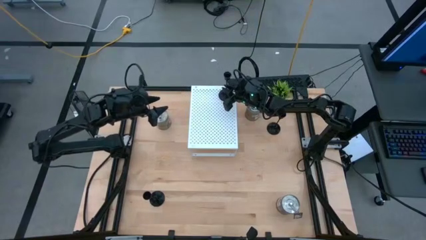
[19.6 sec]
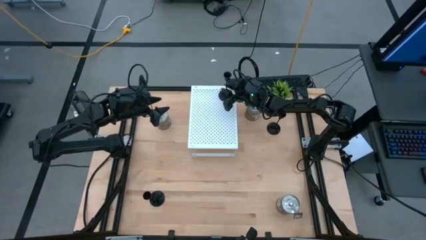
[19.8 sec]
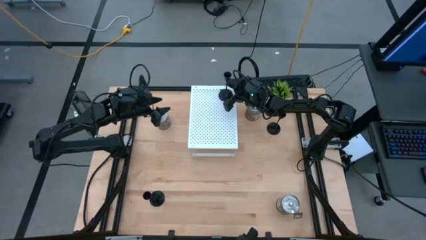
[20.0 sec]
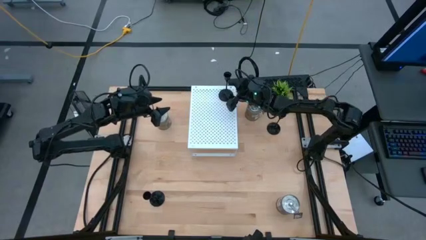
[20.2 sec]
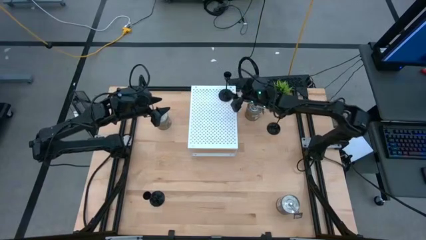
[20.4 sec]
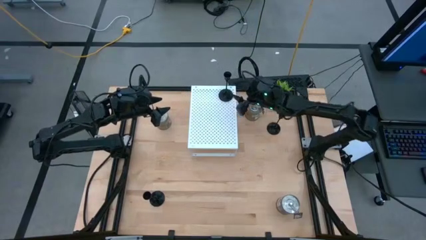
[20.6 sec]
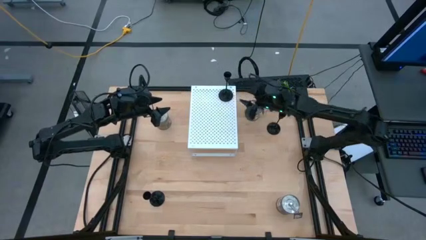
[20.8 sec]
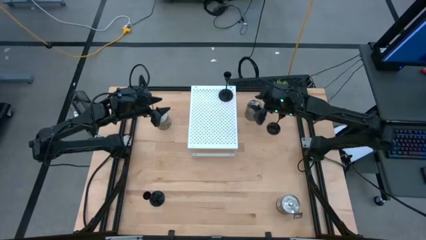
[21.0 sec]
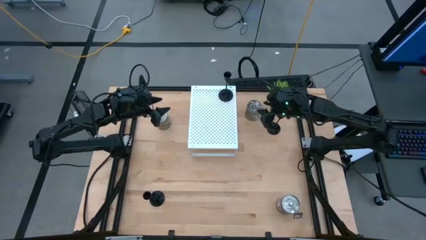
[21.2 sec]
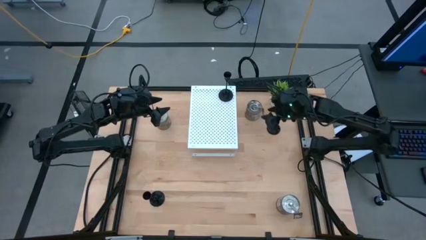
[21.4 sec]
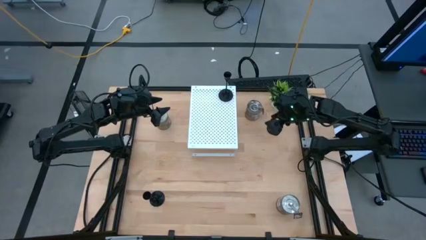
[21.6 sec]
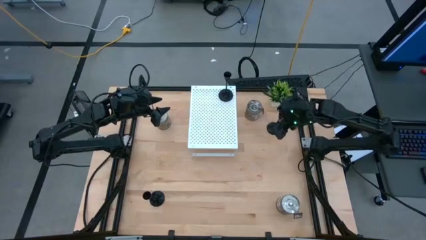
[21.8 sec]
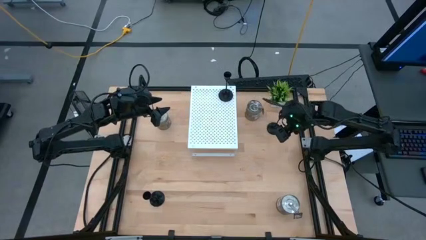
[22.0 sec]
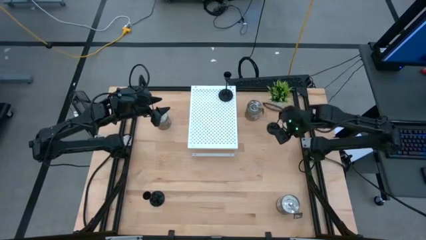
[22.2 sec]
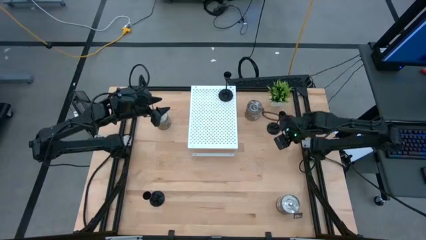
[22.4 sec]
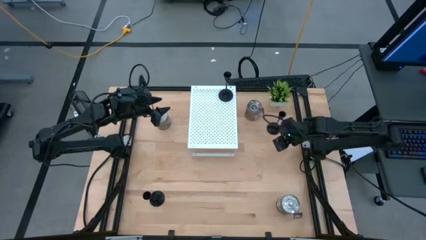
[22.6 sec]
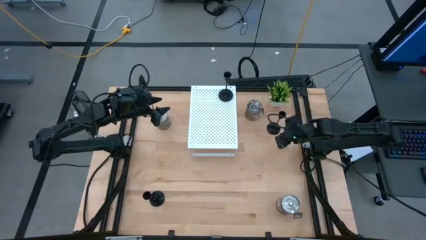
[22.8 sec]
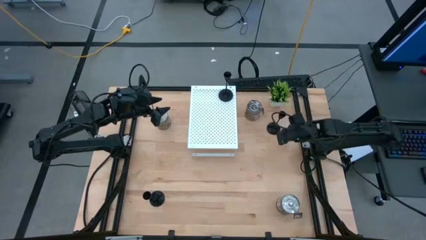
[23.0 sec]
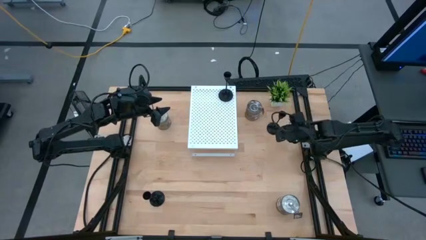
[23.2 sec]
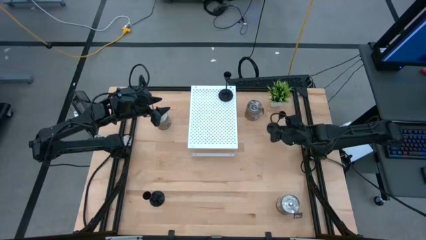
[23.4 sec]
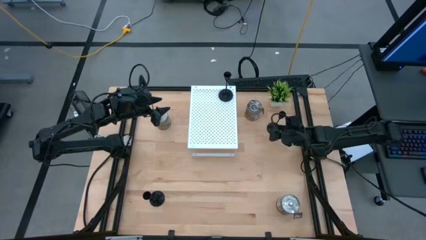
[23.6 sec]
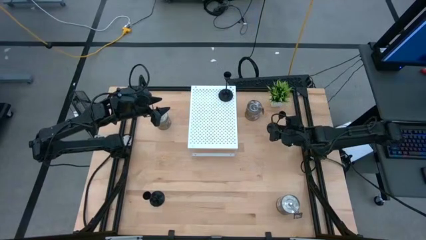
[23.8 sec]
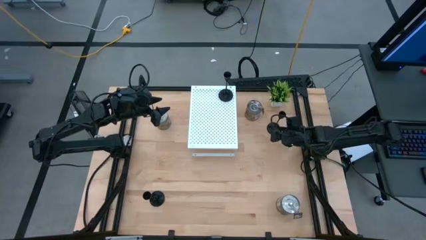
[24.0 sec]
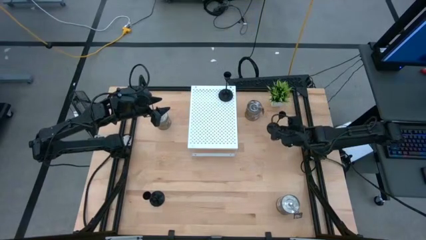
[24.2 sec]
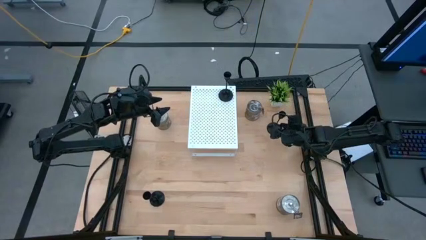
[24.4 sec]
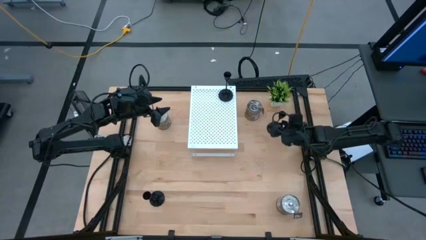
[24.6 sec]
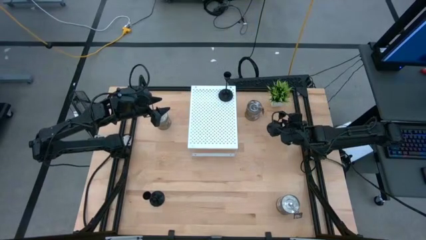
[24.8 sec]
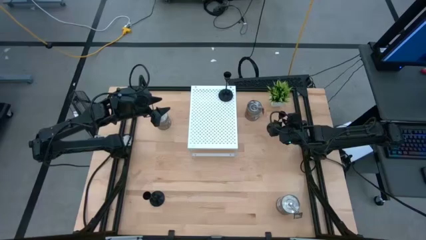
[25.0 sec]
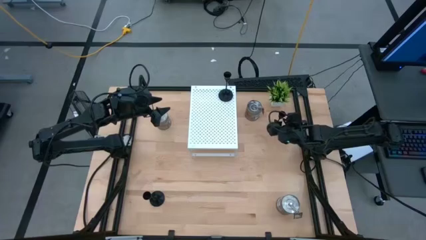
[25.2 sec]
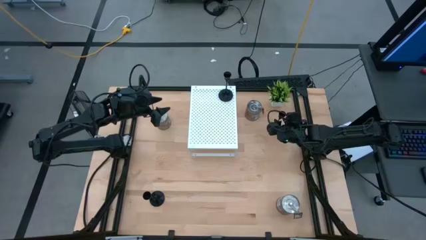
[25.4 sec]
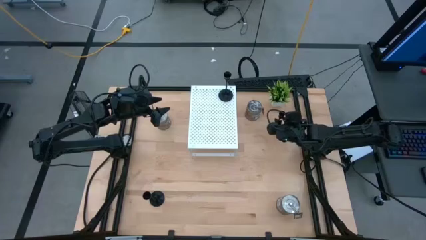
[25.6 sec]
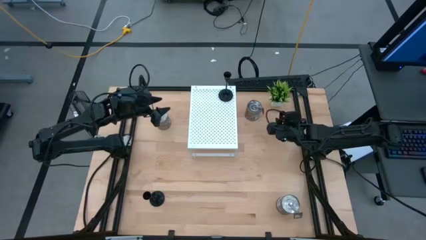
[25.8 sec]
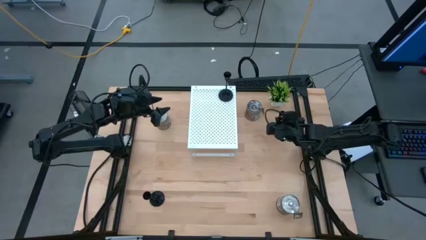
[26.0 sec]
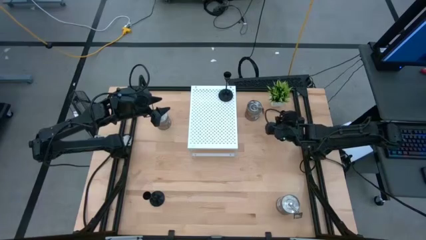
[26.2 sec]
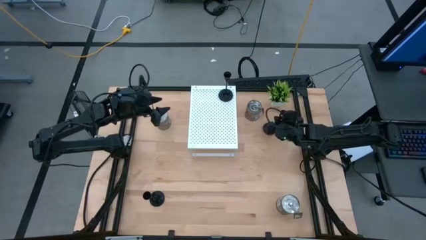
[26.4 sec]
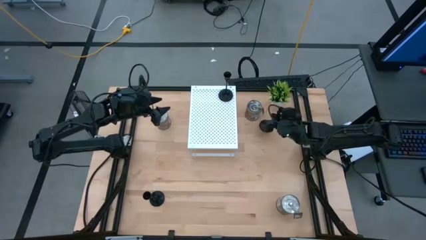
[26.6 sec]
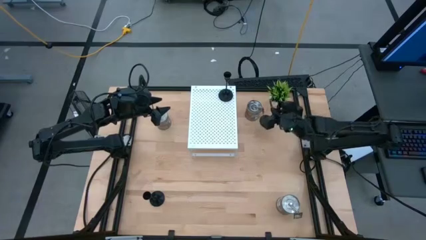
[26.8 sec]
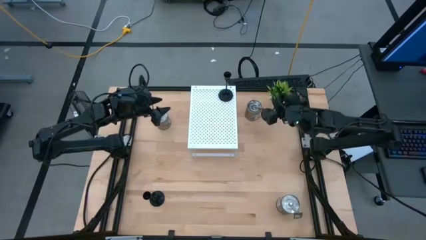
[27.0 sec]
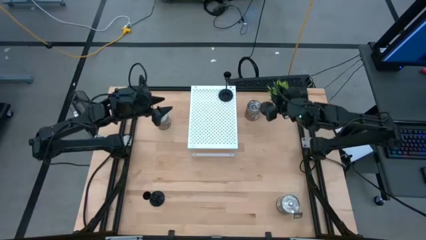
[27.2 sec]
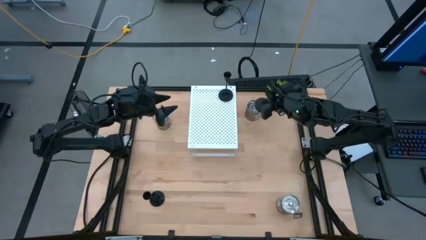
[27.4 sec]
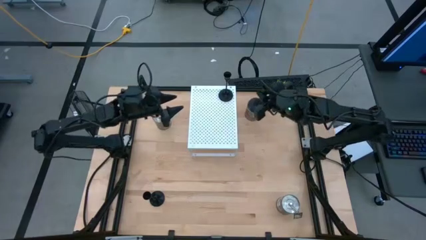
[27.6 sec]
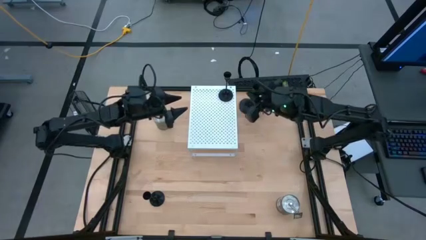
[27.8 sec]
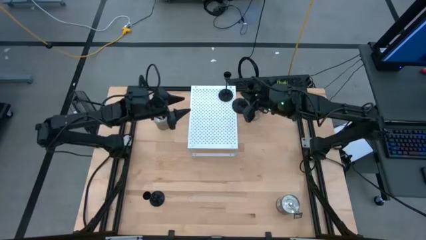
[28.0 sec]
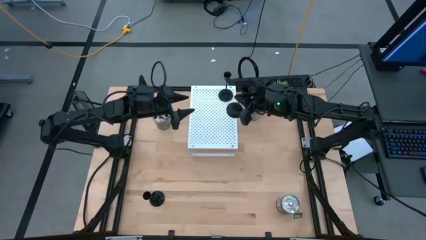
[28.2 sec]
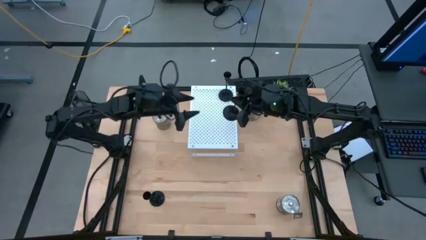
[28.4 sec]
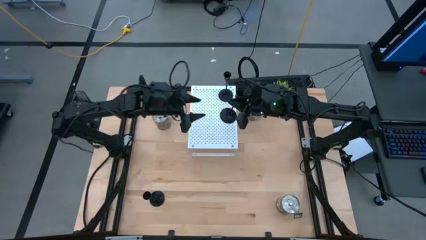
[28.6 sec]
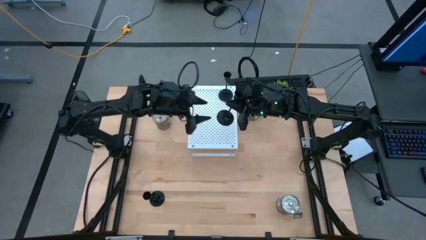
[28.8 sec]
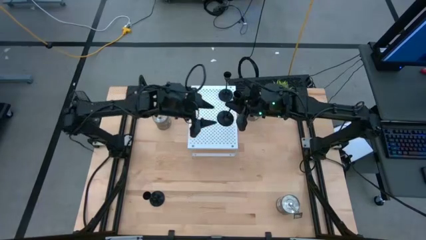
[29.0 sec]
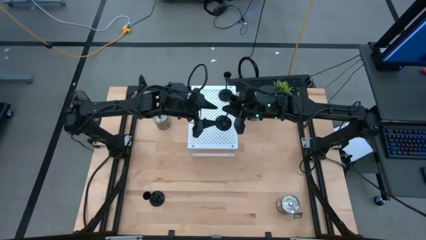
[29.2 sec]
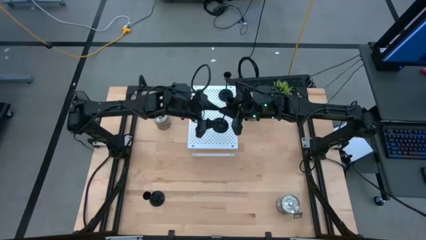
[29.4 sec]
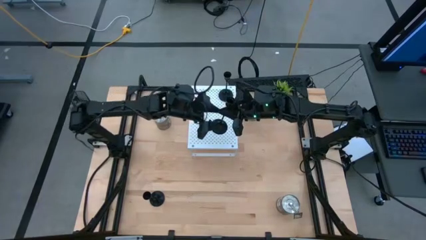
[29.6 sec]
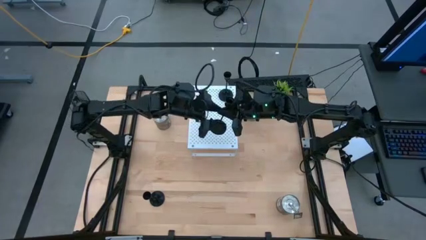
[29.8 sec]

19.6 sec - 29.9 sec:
Task: Pick & Place candle stick holders
Put the right black candle holder on the shelf
